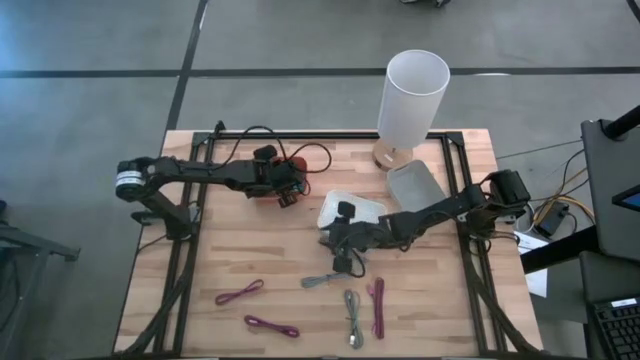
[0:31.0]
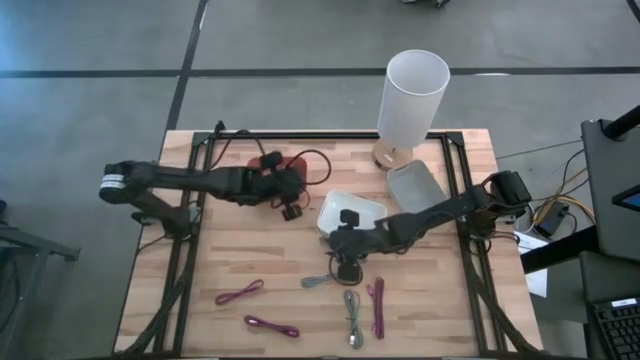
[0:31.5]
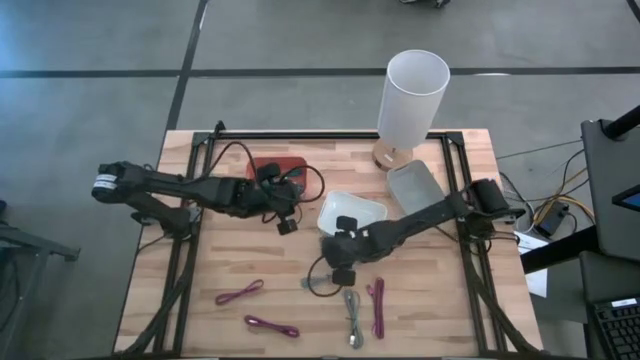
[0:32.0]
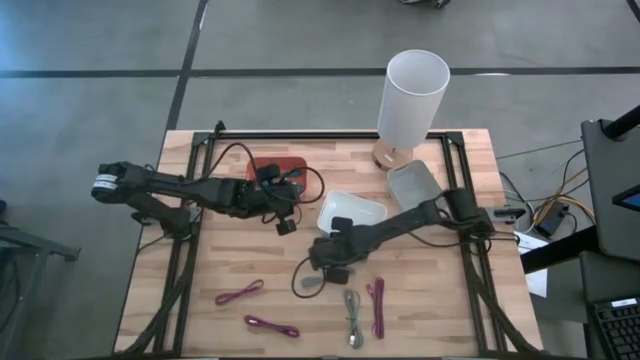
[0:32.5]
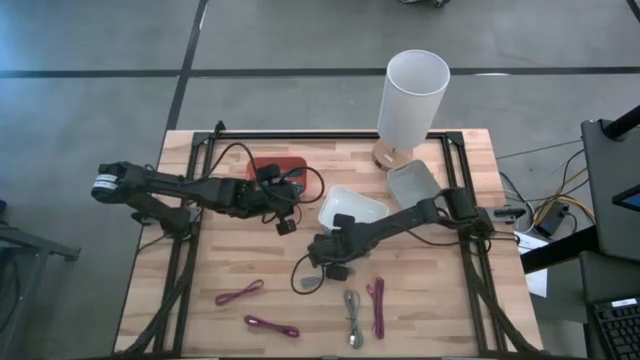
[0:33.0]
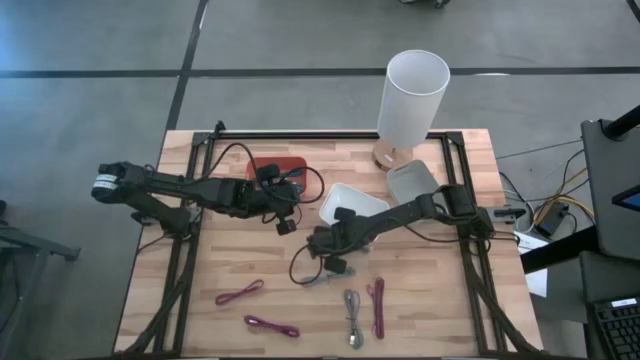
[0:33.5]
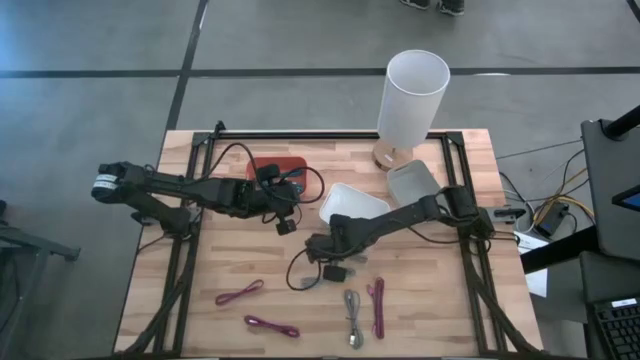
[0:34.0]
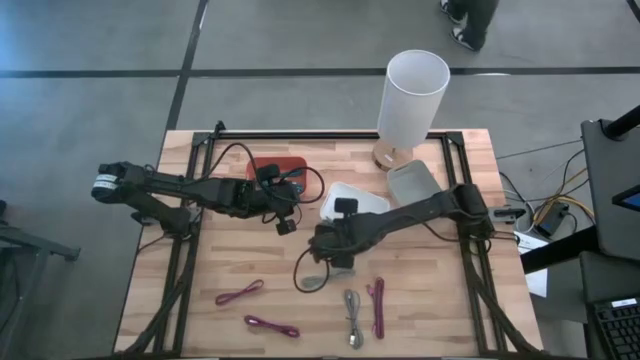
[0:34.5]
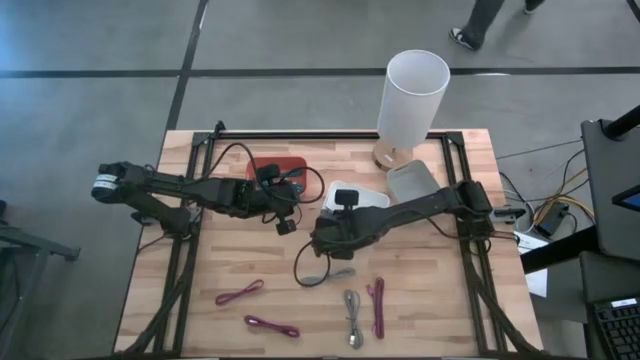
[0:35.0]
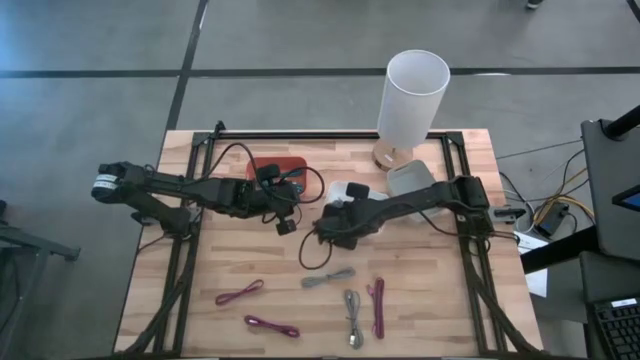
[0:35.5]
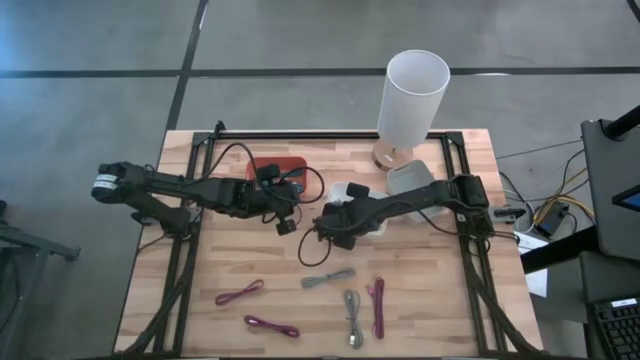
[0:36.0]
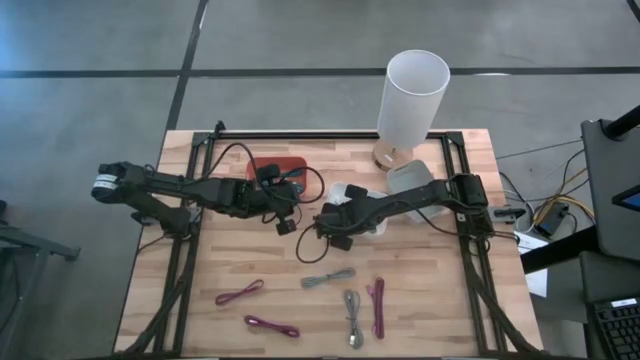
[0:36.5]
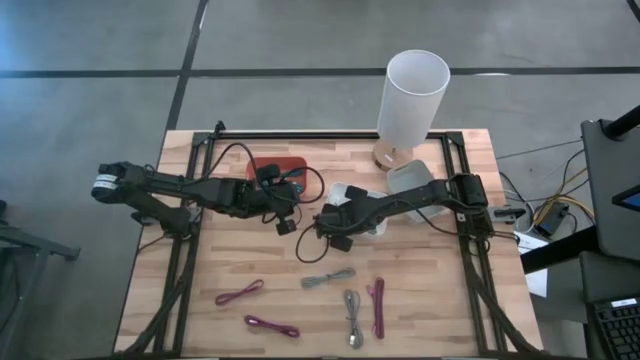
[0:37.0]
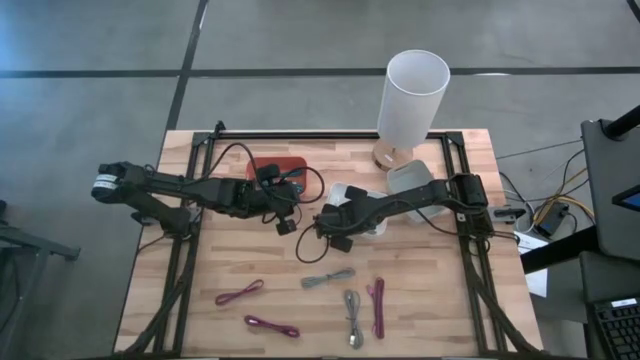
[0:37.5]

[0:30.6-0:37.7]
Task: Pick & Place USB Port
Put the top white charger cable into the white bin

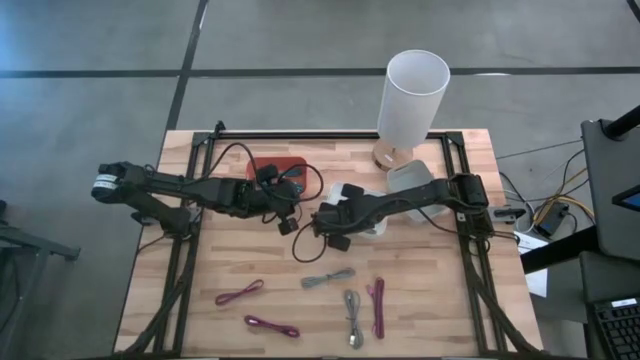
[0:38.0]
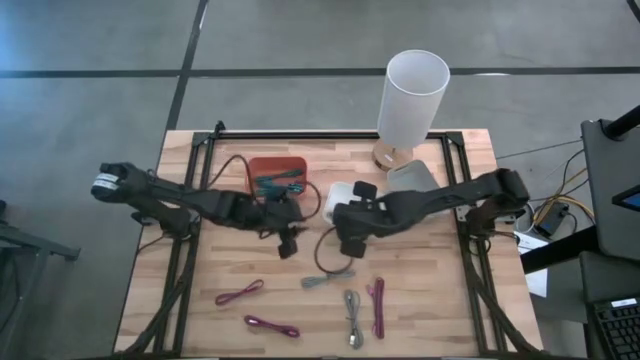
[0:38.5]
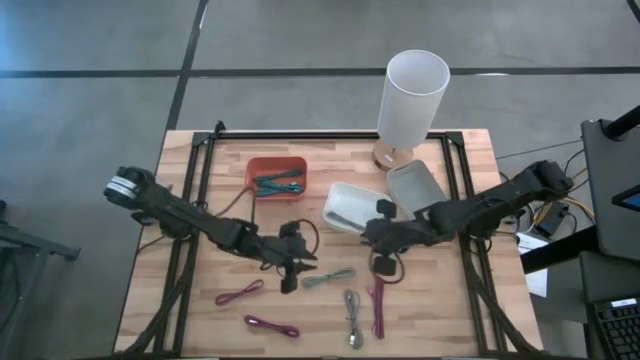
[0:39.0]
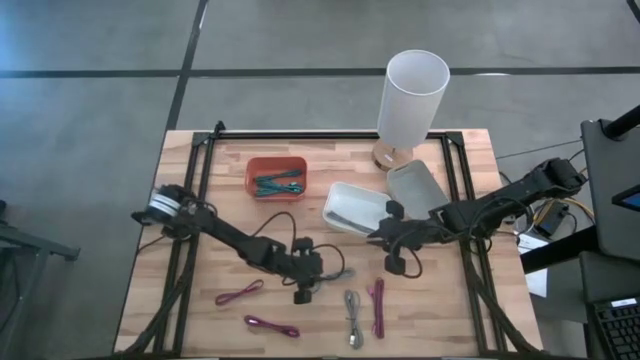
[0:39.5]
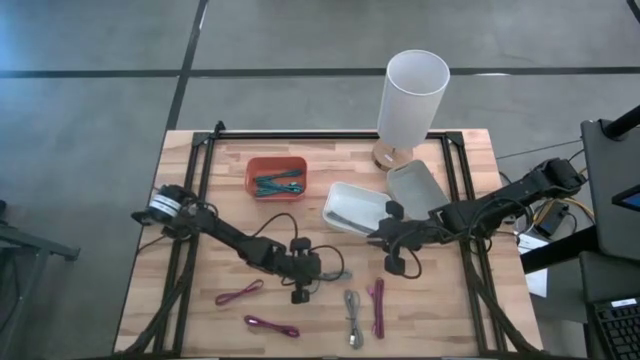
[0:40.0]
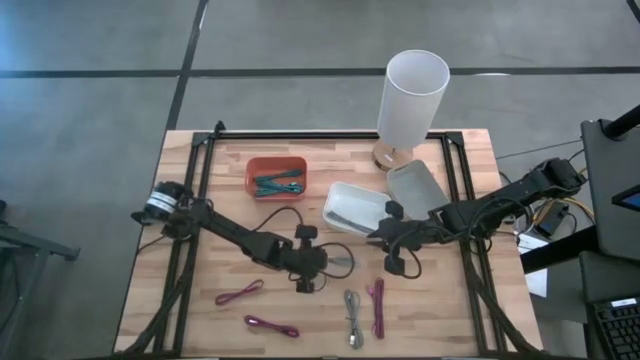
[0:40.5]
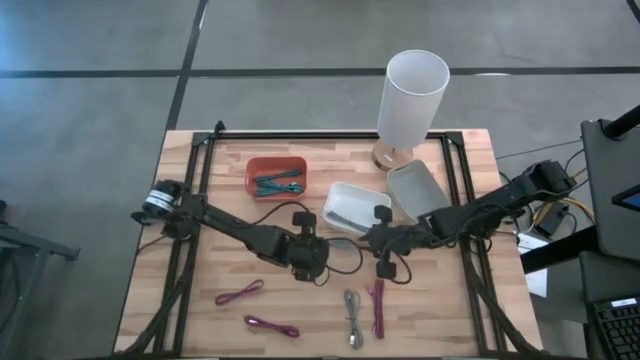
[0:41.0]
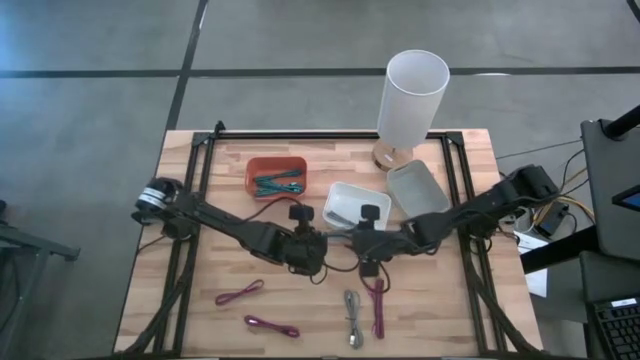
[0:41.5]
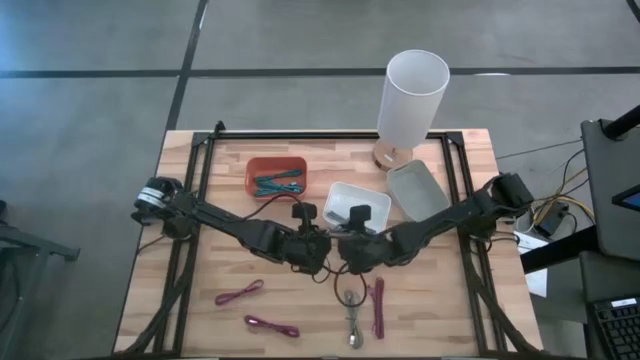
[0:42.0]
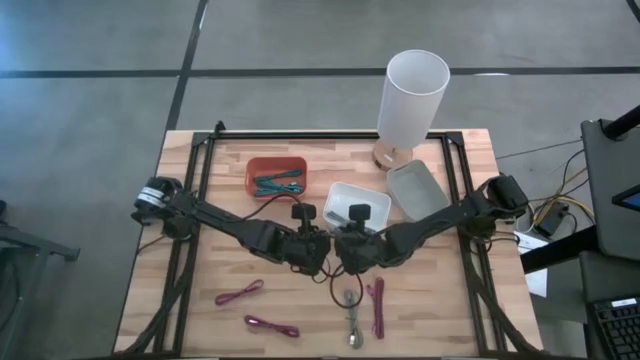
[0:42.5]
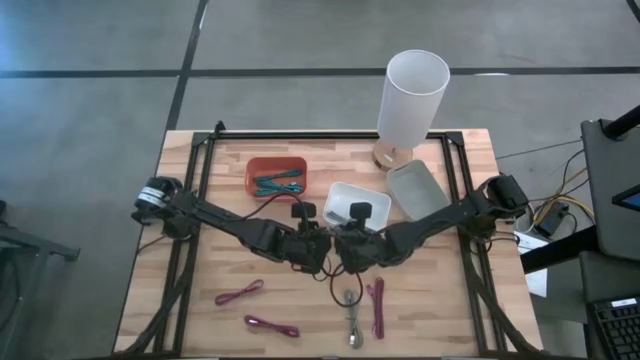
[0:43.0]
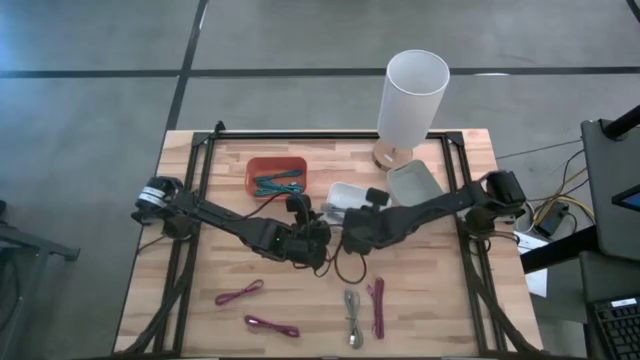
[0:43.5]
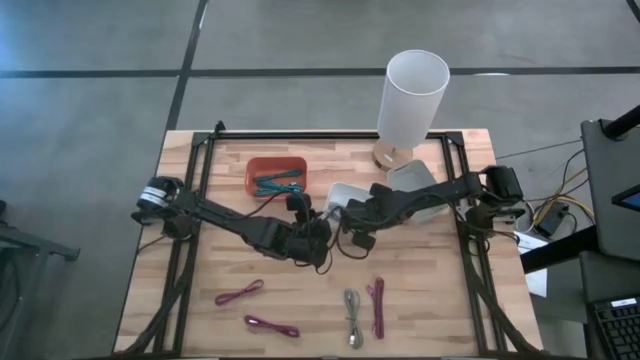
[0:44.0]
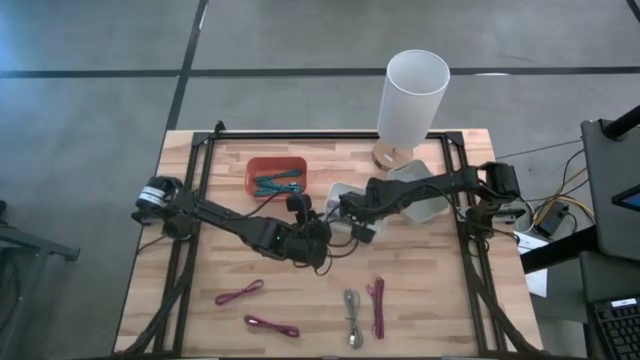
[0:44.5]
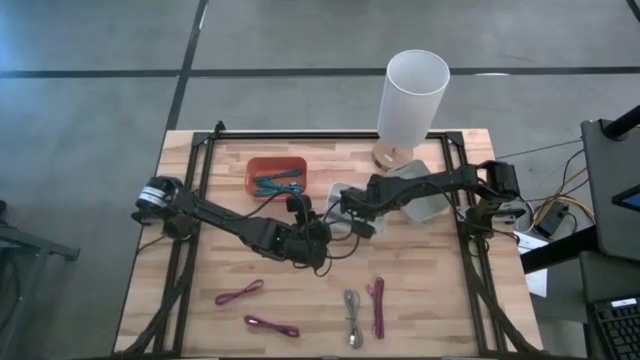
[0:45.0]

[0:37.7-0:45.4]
Put the top white charger cable into the white bin

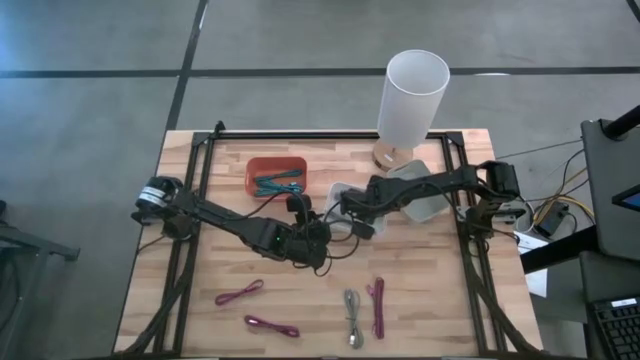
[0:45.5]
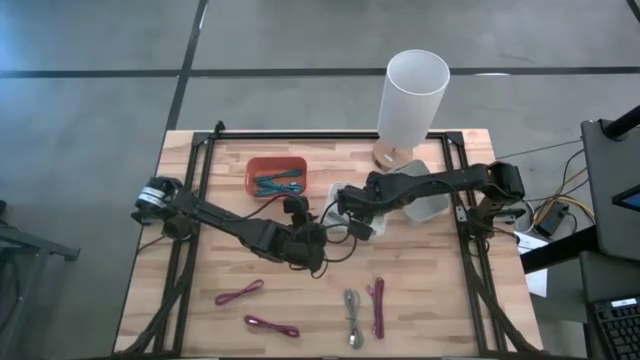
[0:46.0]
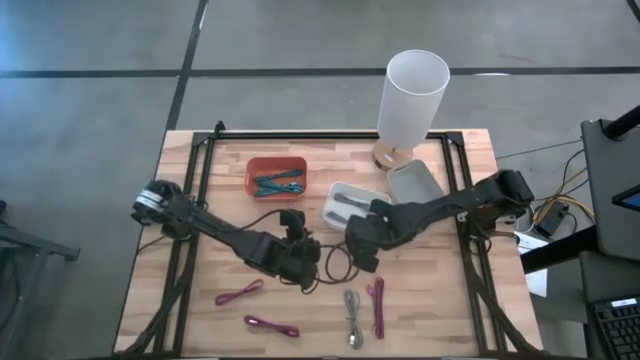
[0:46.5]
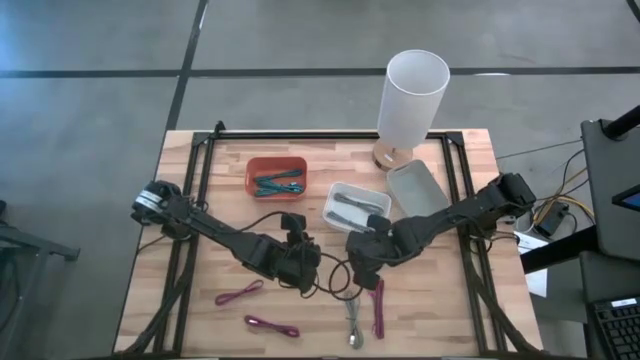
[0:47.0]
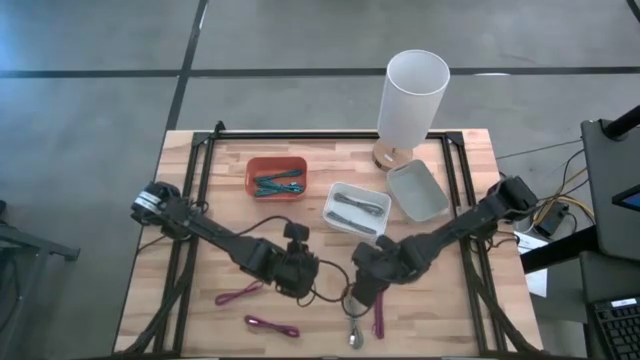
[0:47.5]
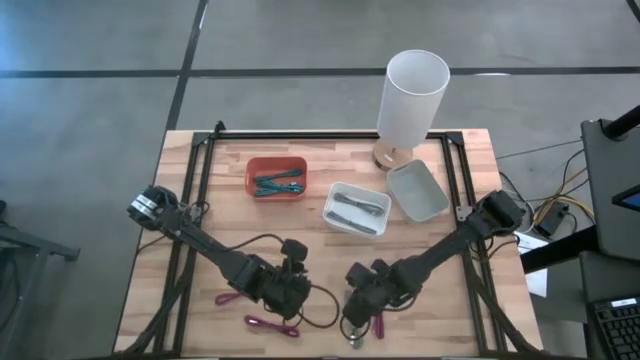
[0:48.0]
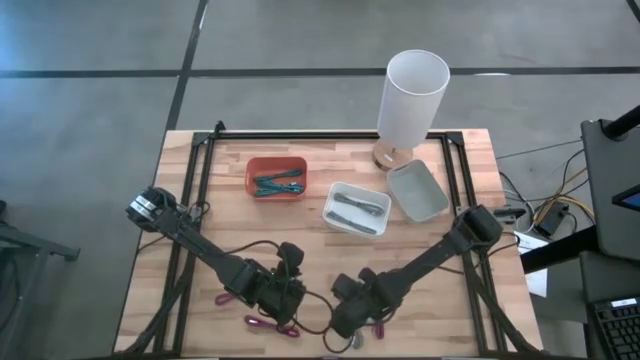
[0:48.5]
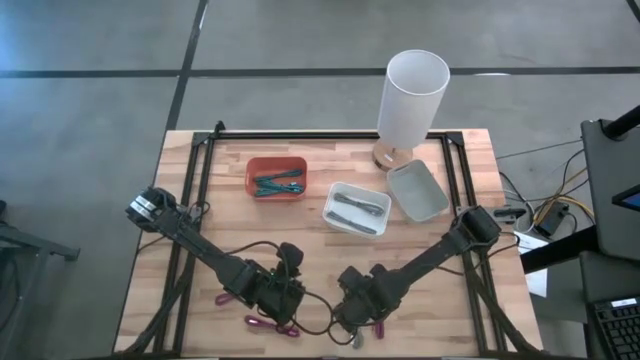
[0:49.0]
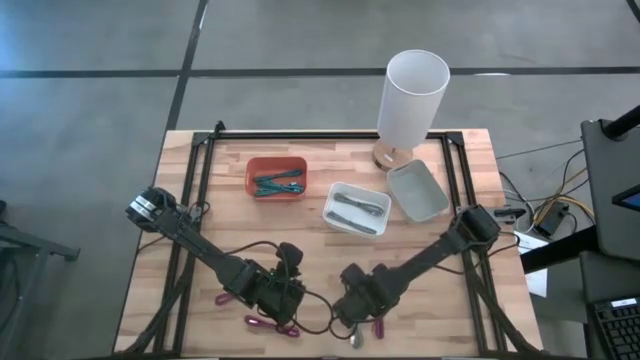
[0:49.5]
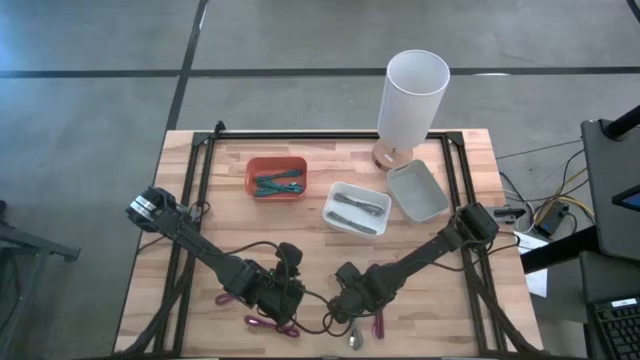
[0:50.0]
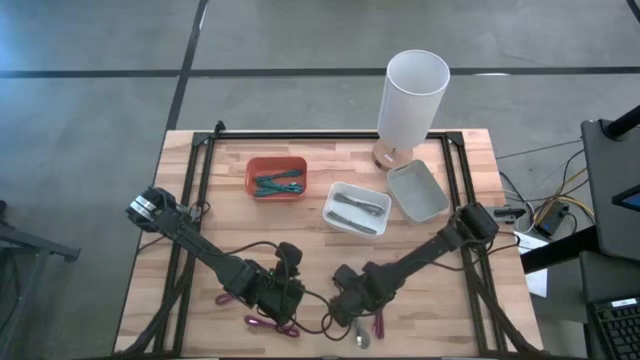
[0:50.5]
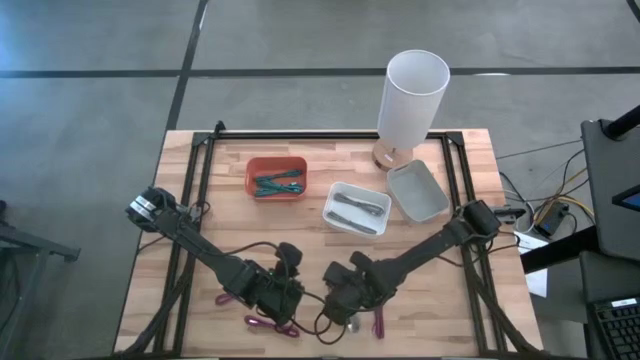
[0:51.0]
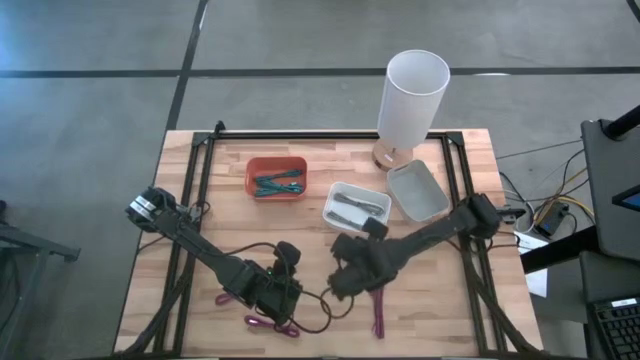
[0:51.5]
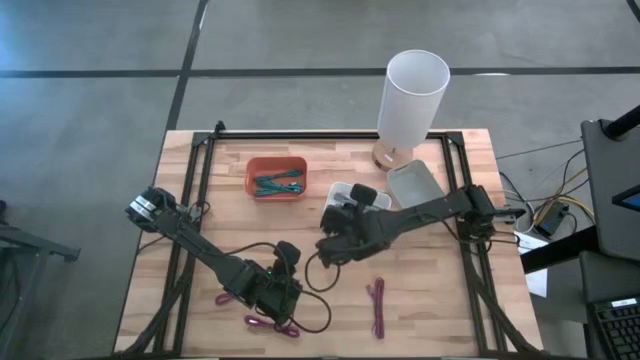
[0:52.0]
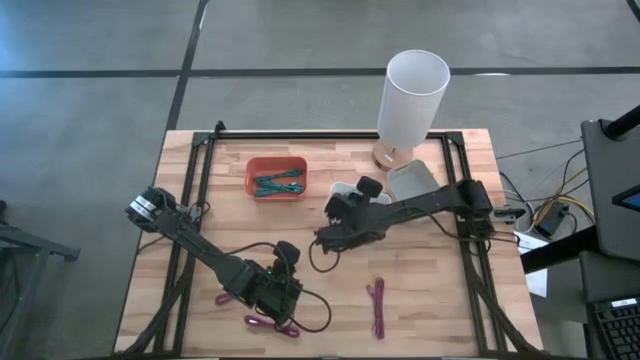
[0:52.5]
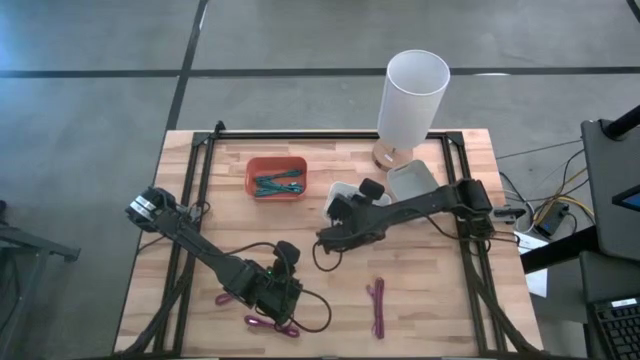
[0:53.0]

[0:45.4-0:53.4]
Put the white charger cable into the white bin
